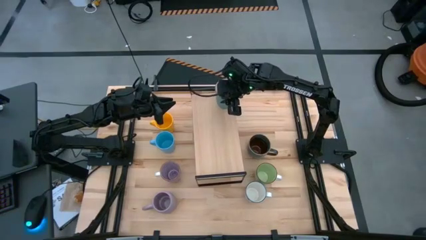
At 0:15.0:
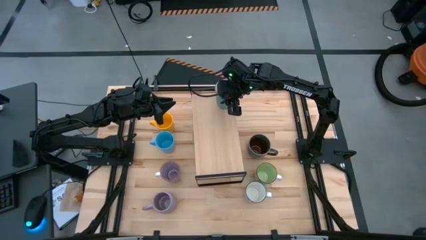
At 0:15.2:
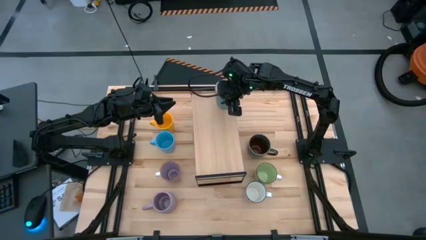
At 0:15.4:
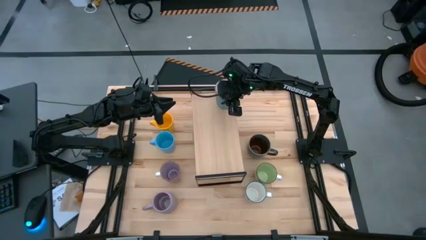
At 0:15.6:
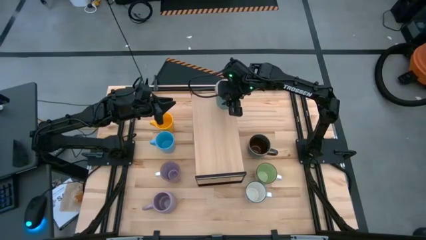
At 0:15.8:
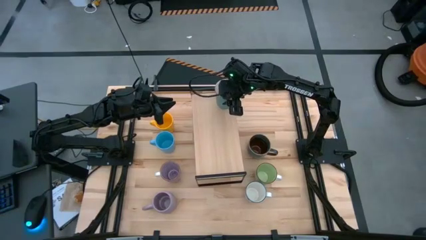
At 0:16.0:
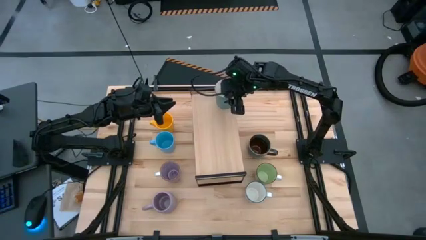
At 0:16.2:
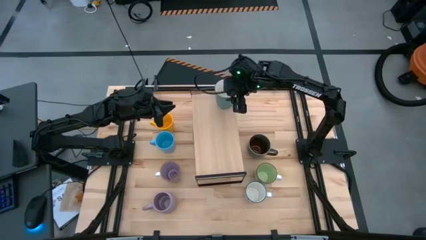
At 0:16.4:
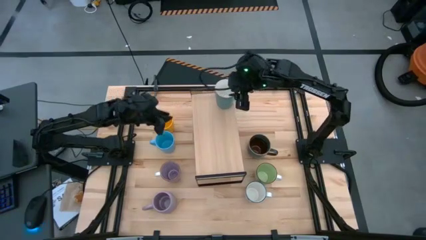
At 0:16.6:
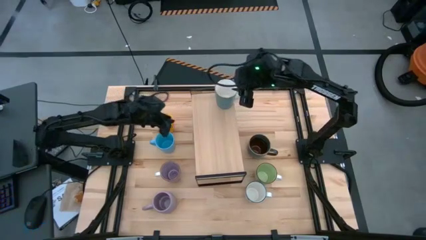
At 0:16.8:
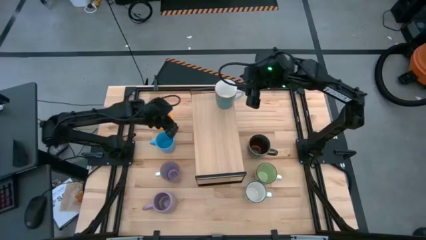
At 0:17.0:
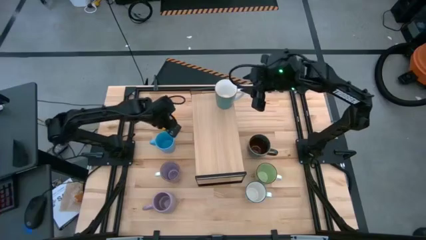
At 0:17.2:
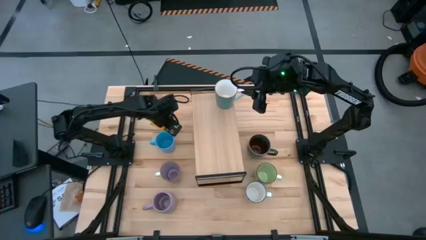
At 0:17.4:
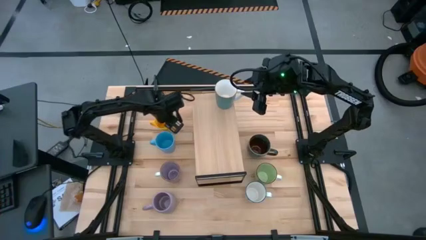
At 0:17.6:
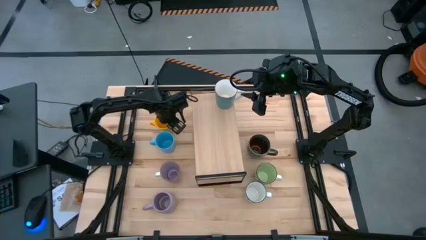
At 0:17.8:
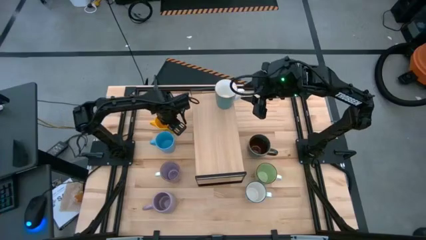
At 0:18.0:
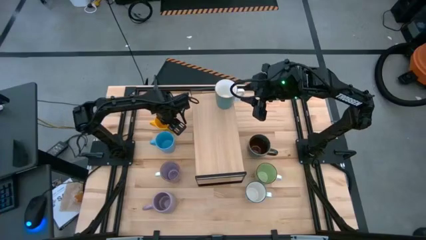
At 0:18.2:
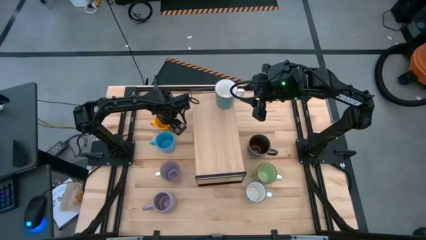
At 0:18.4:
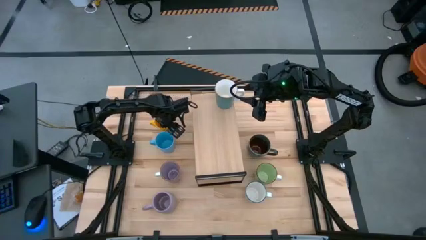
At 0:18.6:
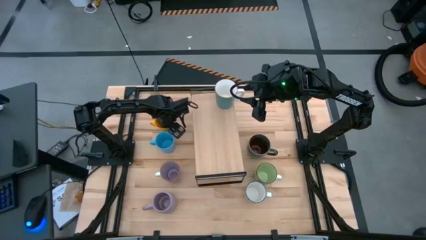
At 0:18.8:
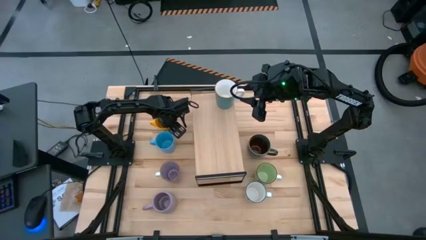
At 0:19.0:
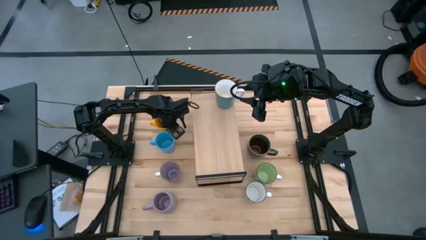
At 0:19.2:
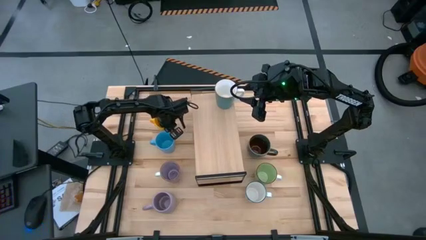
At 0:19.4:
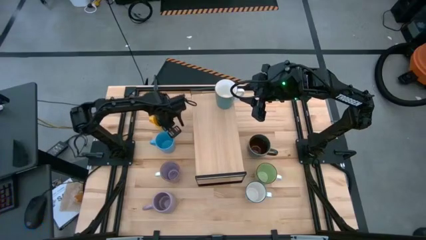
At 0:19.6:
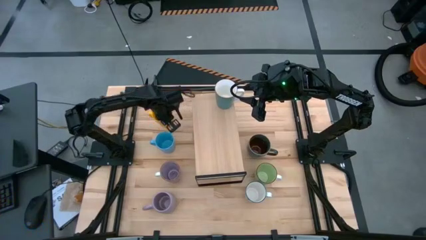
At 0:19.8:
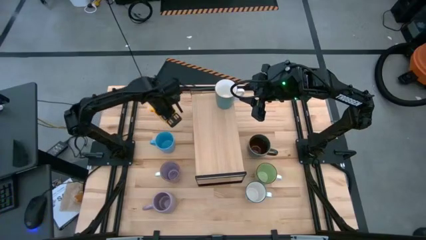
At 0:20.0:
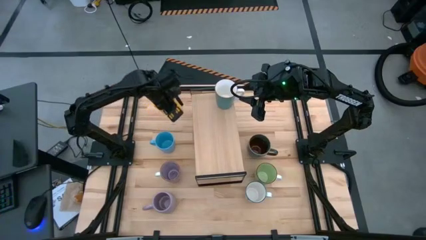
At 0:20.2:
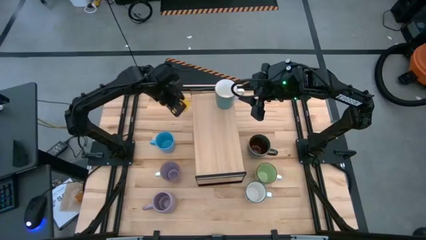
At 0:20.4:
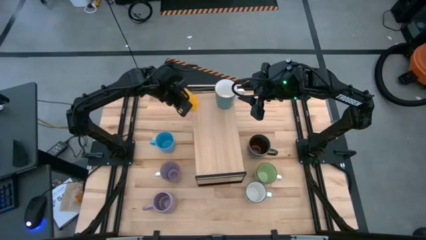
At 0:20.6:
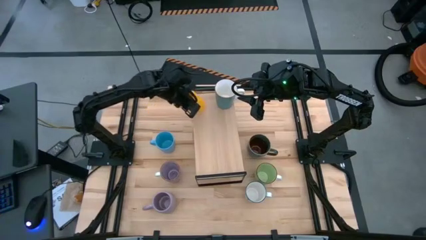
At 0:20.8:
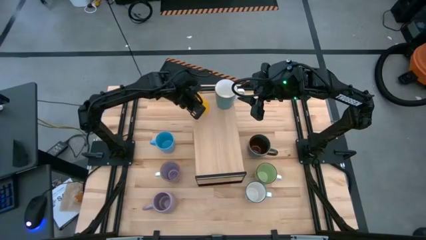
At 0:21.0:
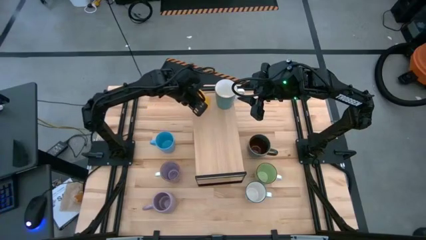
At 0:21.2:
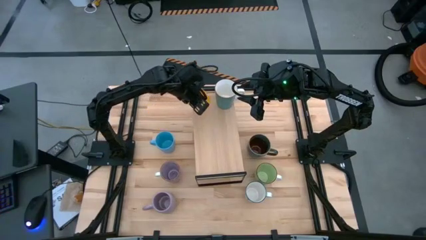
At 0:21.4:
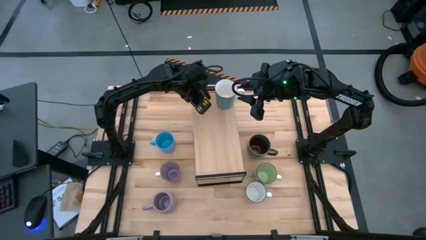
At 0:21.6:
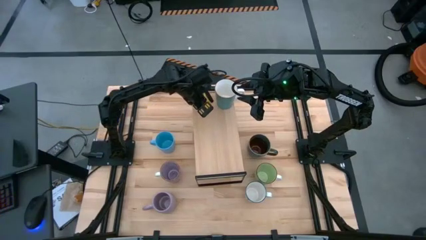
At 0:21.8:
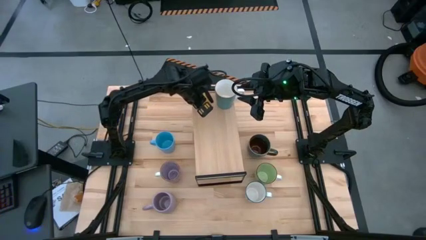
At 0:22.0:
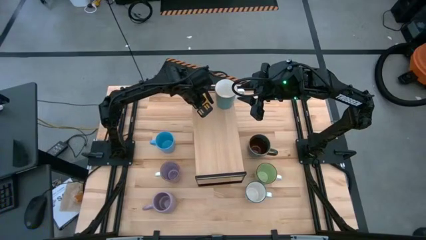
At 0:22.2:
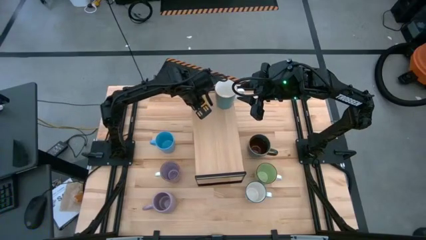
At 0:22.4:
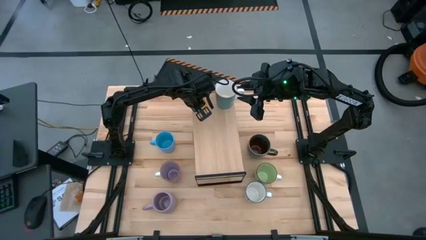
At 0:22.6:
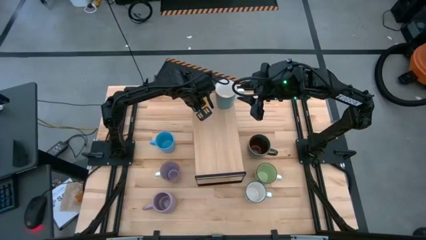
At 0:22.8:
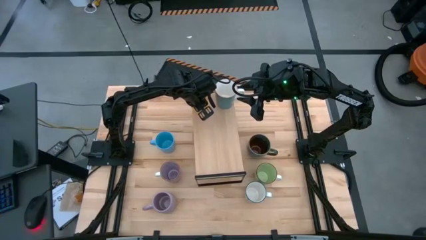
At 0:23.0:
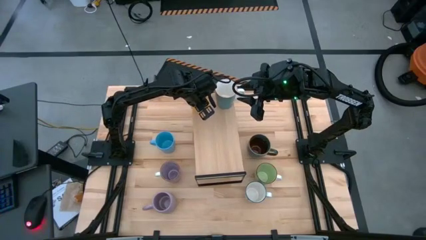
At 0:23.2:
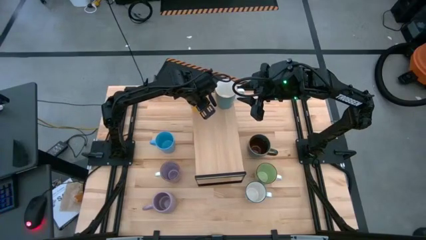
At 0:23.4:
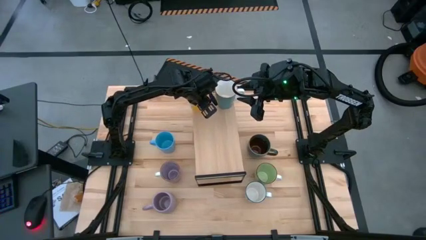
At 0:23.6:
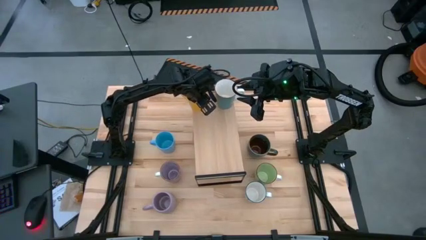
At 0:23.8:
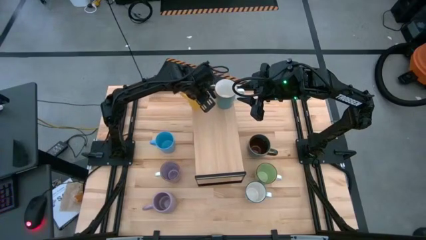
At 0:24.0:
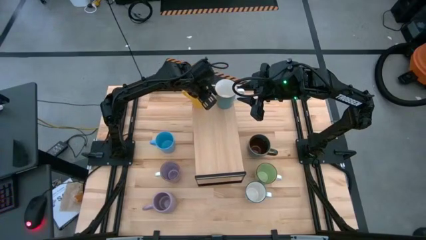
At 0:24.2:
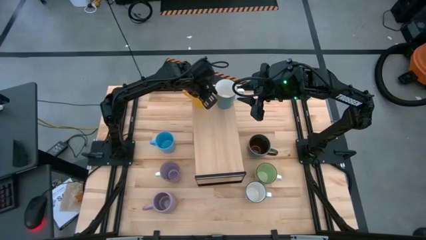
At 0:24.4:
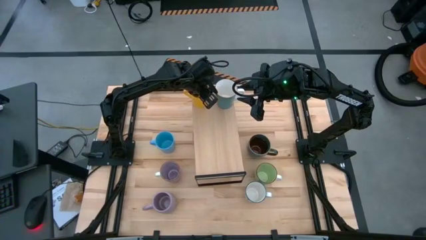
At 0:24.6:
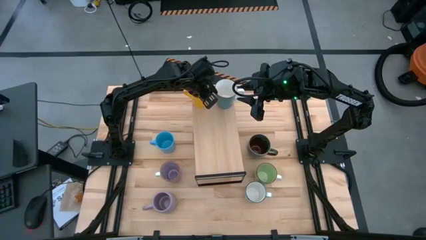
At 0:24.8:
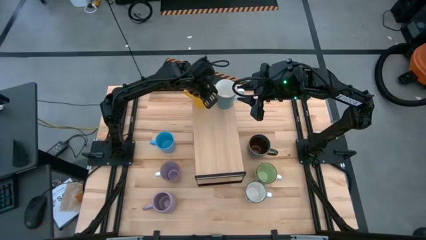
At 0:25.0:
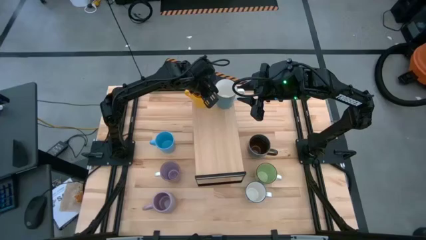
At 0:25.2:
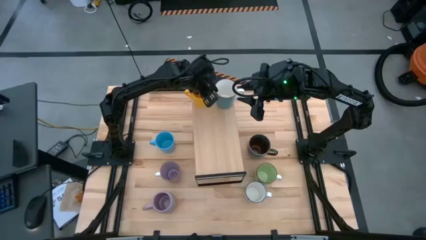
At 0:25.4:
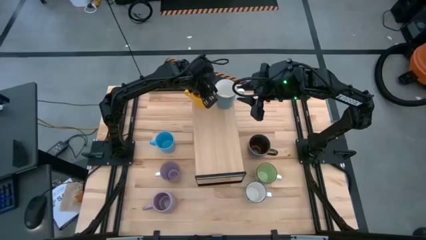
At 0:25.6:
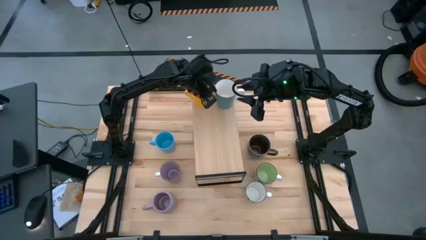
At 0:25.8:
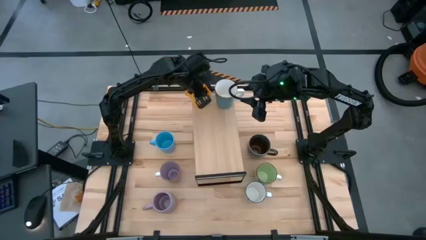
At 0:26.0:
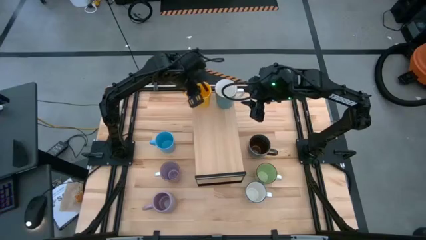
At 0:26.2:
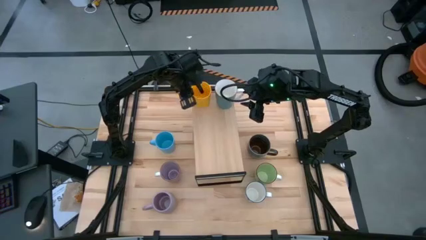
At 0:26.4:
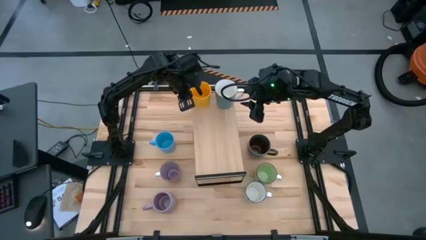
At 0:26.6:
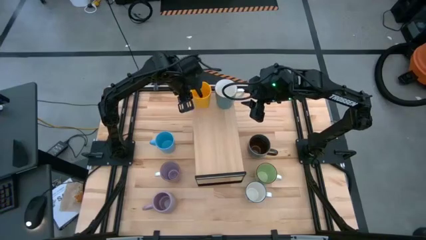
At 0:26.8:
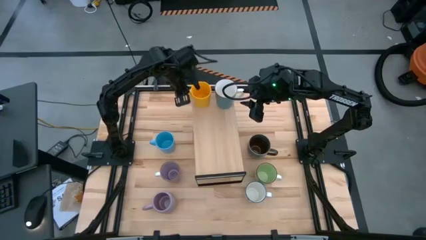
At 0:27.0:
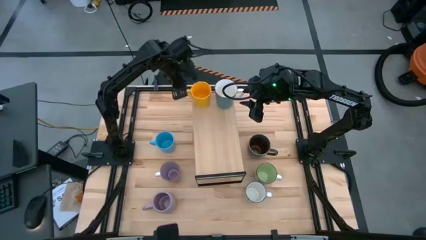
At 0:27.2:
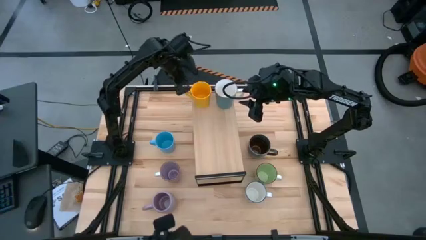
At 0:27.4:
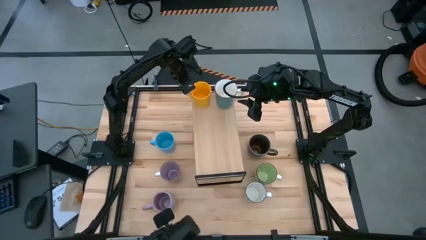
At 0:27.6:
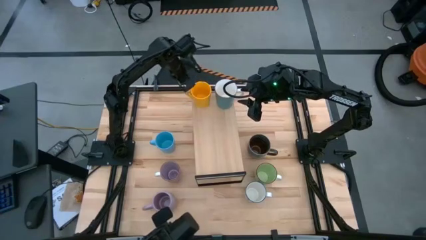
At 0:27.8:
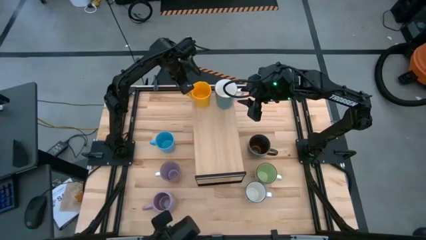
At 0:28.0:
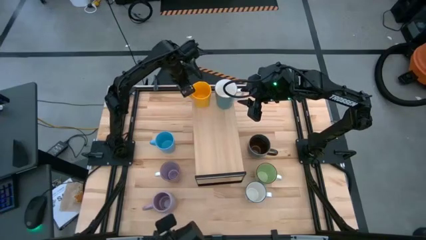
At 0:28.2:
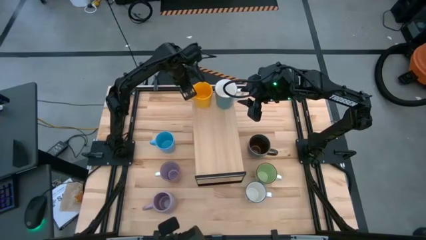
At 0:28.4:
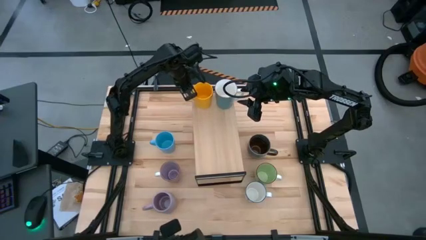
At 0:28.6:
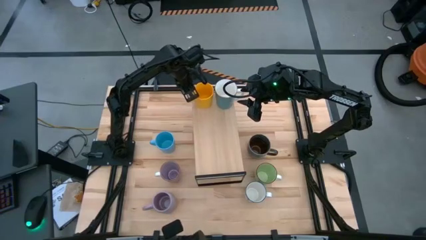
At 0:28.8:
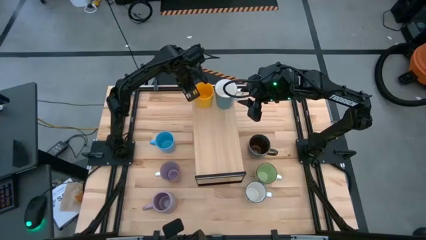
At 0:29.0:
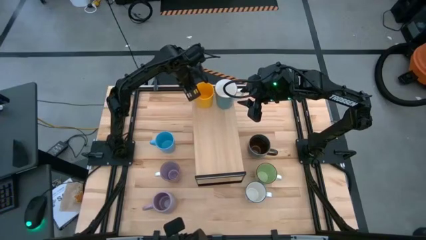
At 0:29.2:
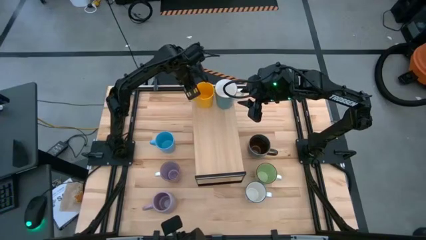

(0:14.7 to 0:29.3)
Task: Place coffee mugs
Put the yellow mug on the shelf
